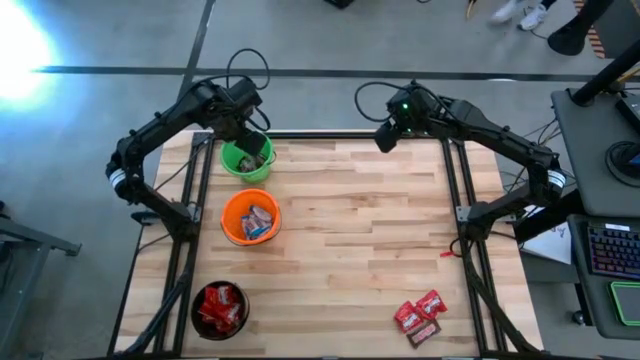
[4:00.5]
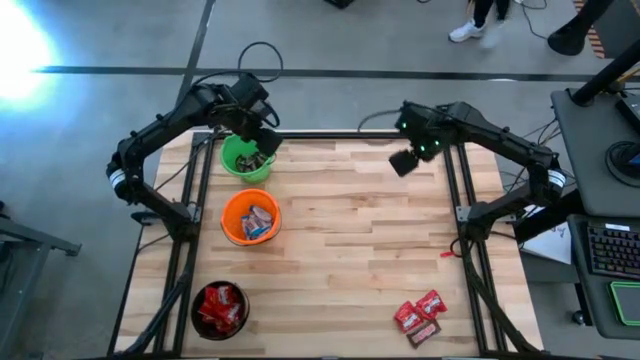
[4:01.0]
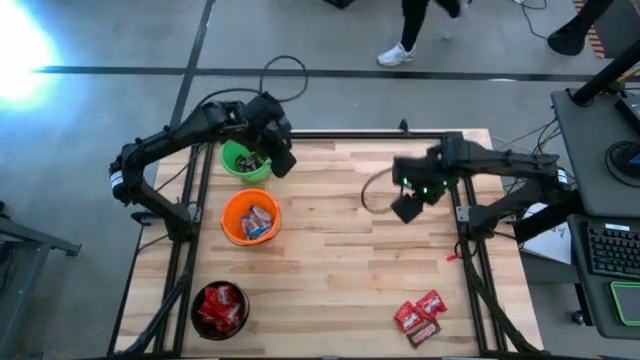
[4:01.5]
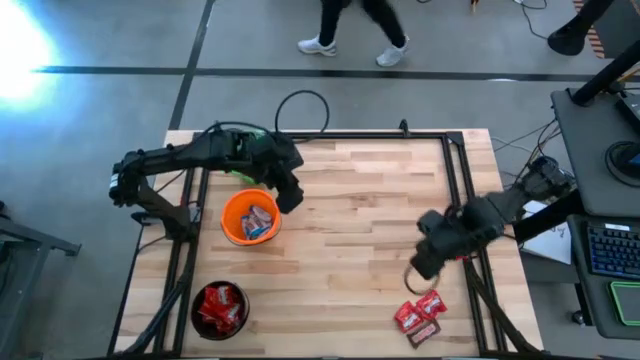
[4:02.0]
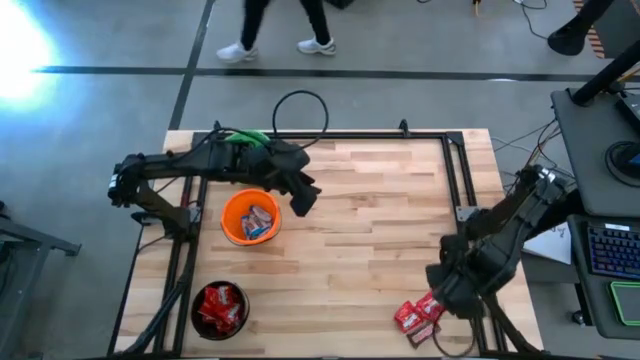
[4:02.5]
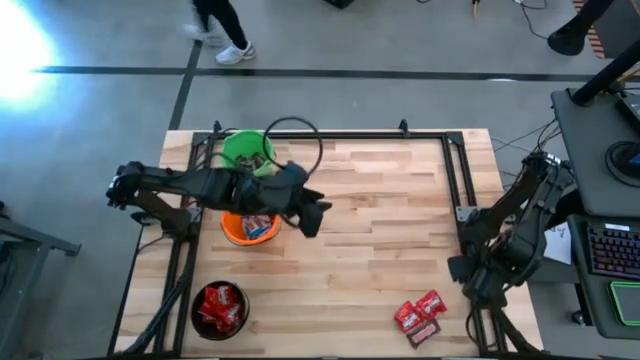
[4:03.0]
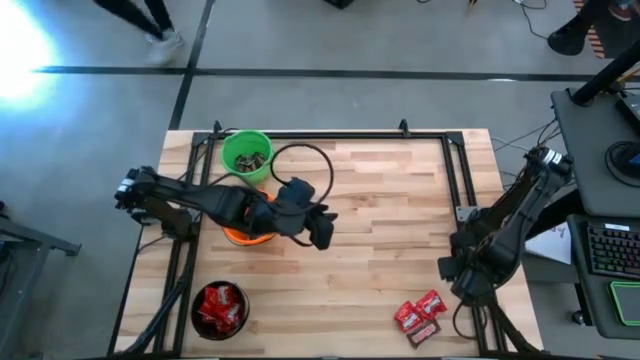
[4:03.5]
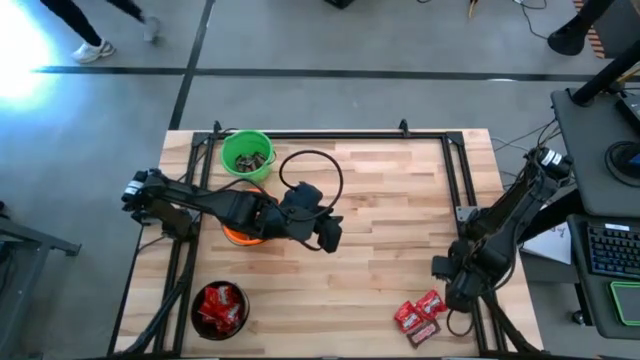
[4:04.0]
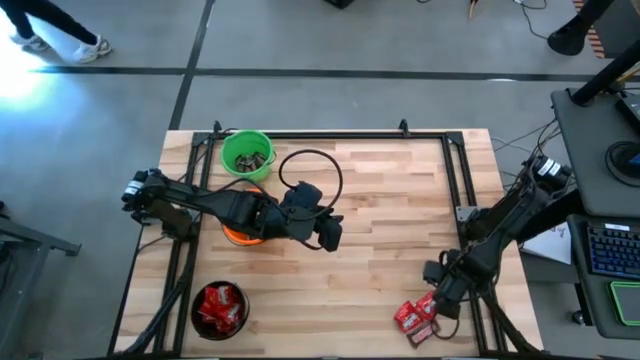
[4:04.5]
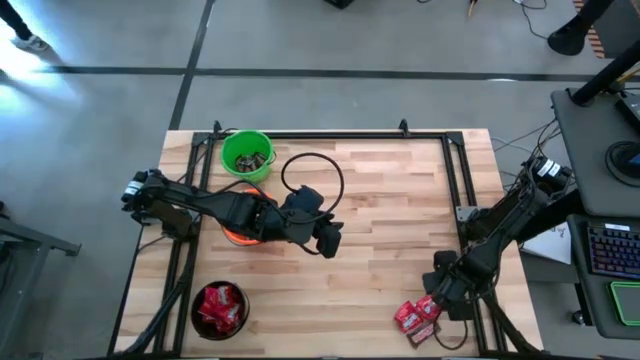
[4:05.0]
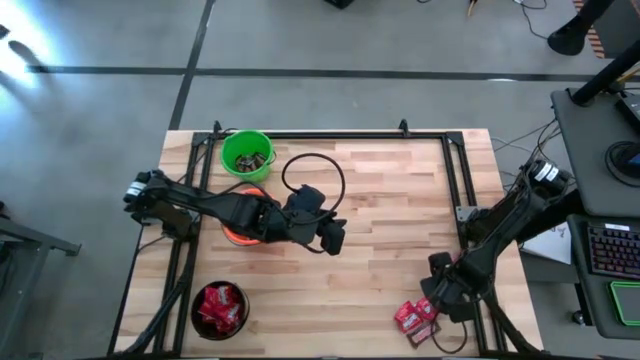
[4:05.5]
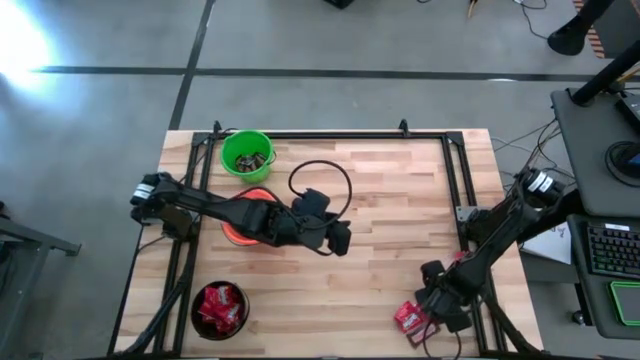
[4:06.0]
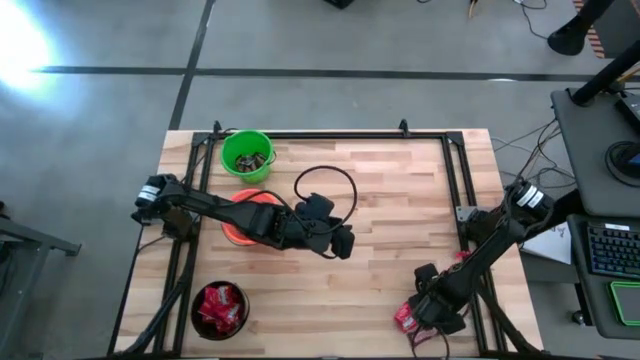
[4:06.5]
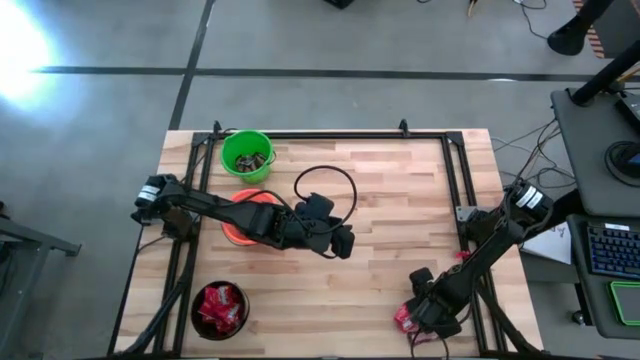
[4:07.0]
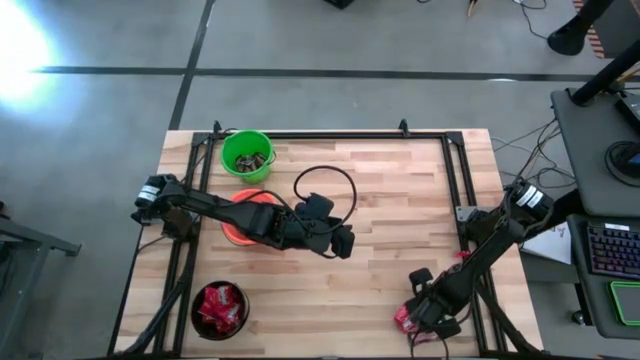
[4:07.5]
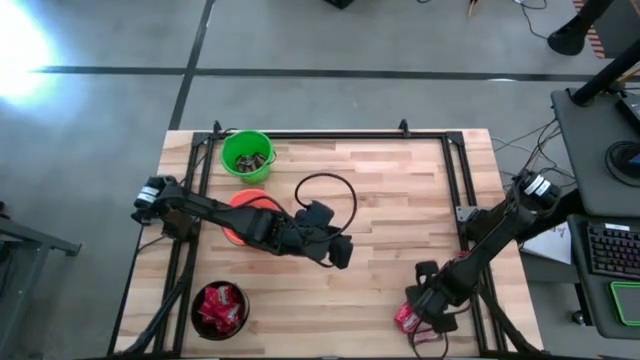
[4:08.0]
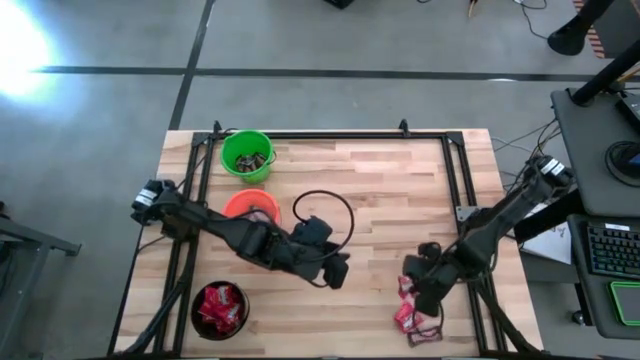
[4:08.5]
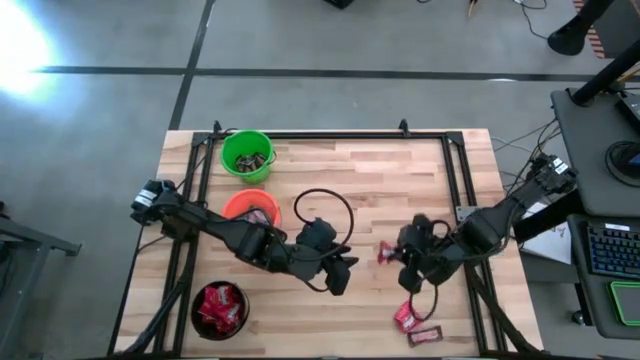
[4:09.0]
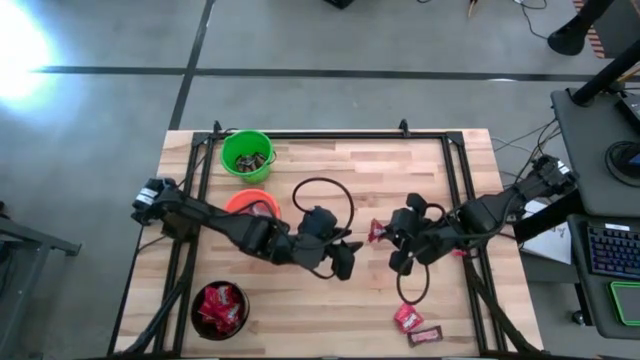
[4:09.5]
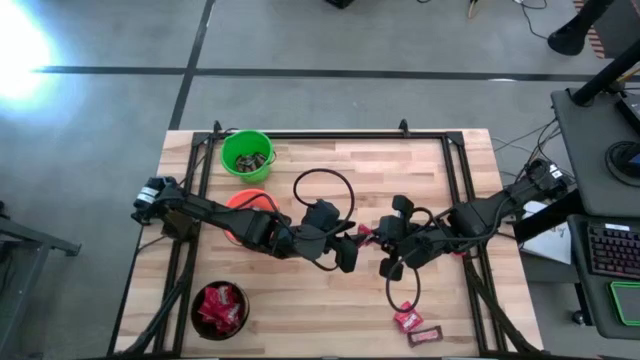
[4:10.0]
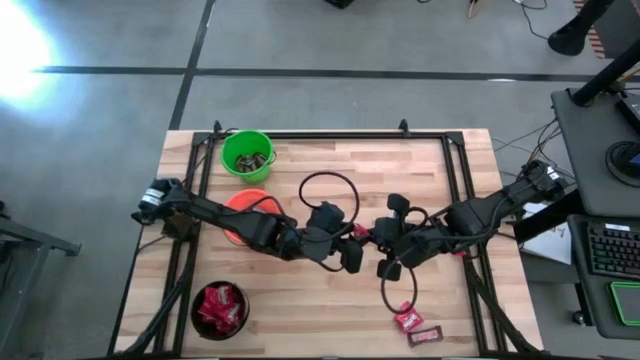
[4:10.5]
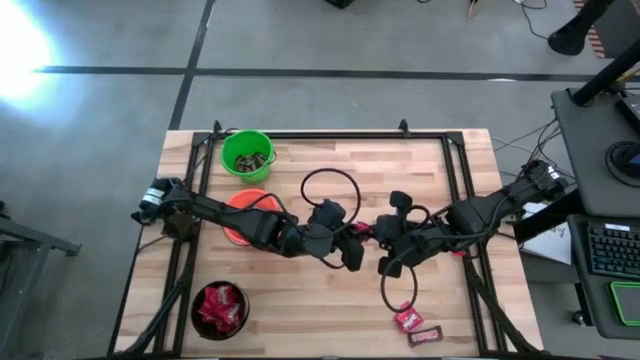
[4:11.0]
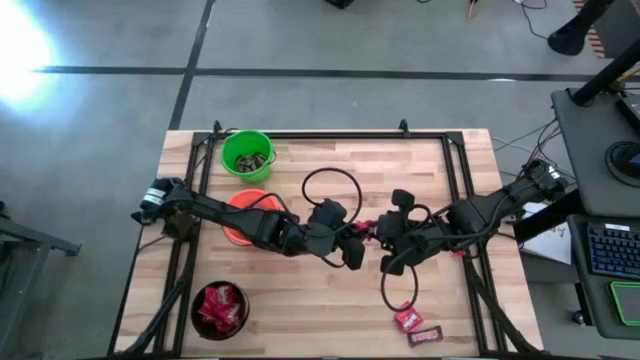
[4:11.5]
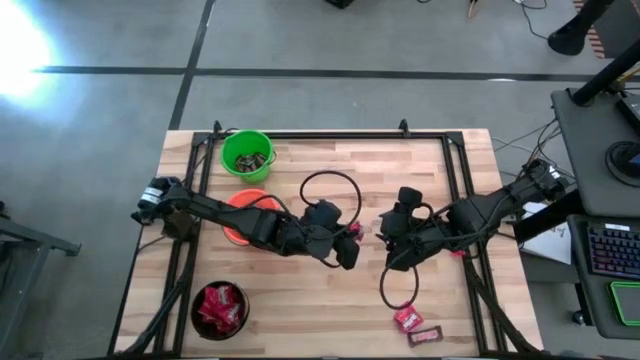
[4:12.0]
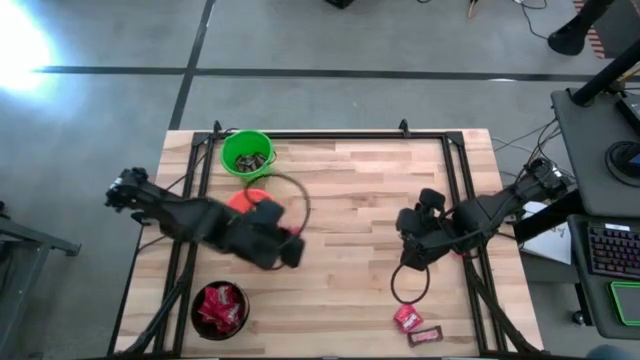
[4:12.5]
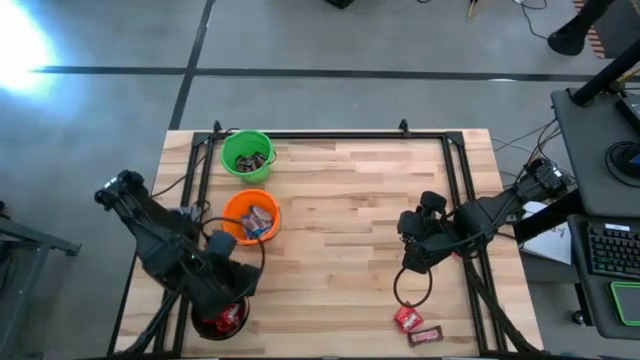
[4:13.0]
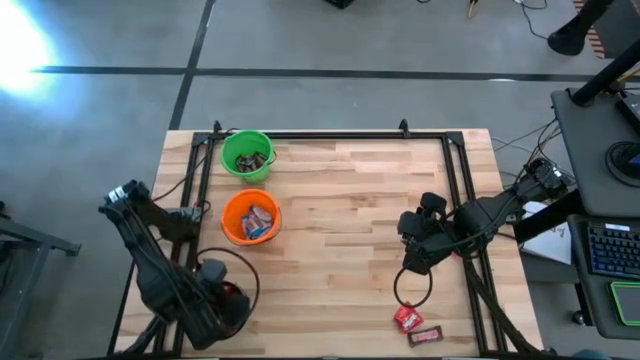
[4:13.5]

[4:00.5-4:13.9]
Task: Organize candy in baskets
Put the red candy into the black bucket

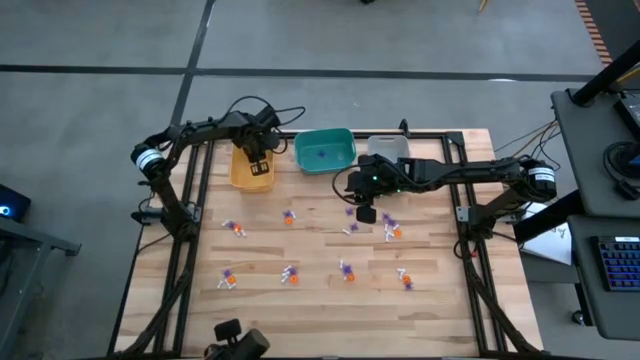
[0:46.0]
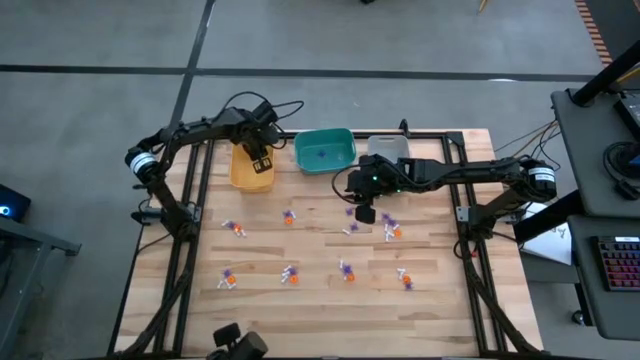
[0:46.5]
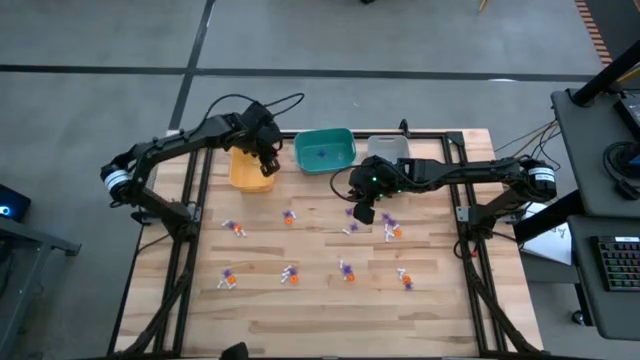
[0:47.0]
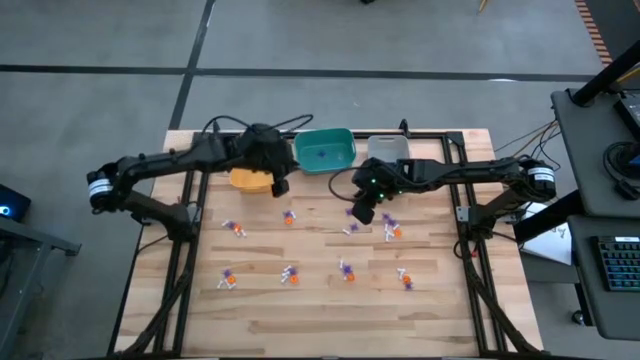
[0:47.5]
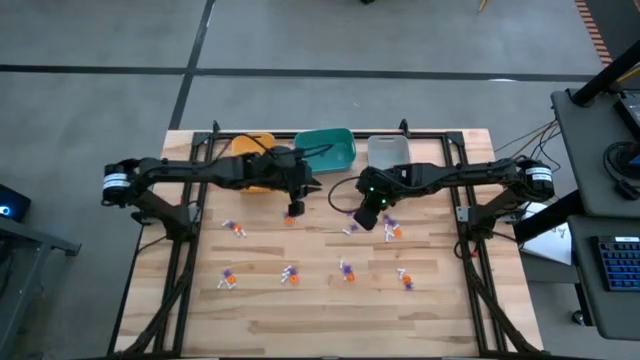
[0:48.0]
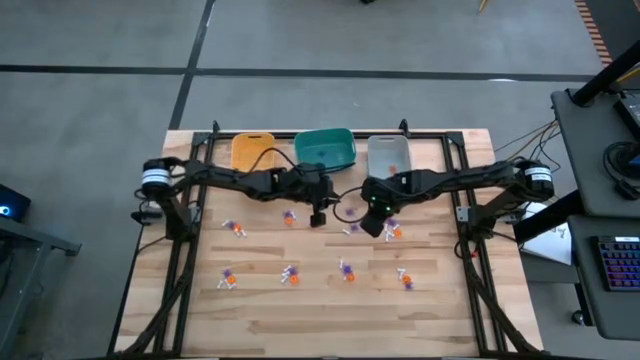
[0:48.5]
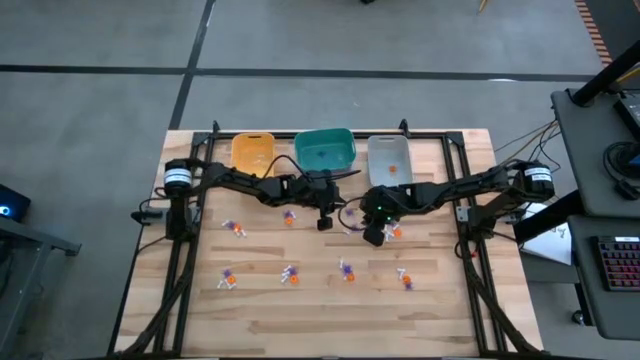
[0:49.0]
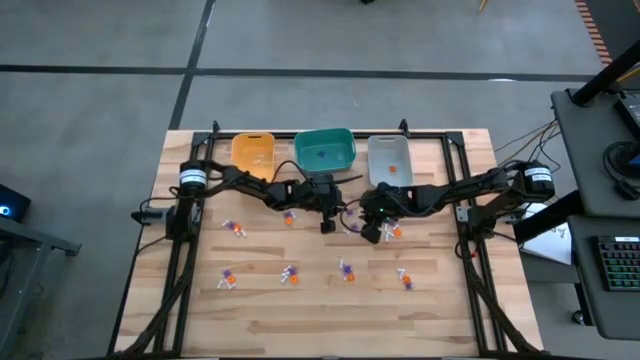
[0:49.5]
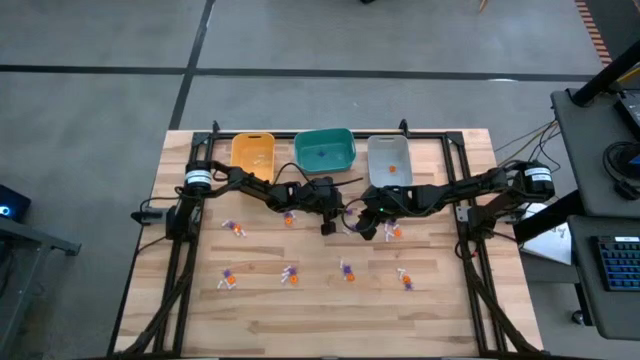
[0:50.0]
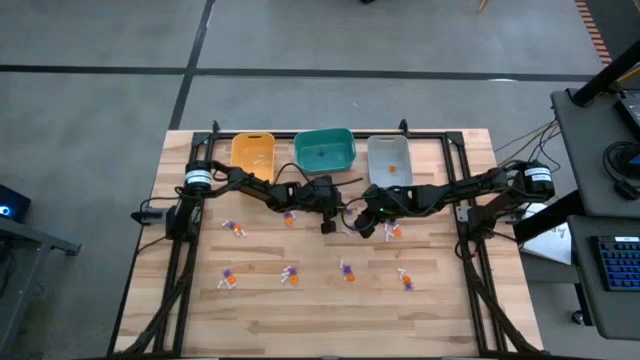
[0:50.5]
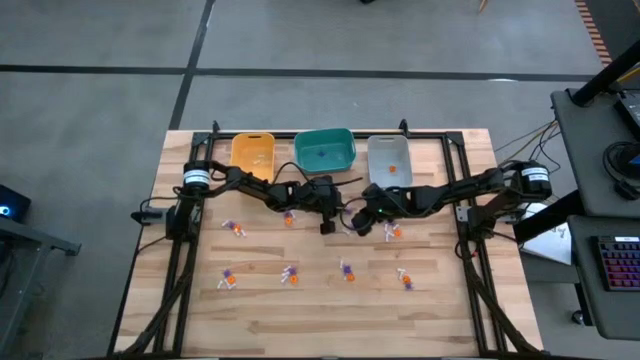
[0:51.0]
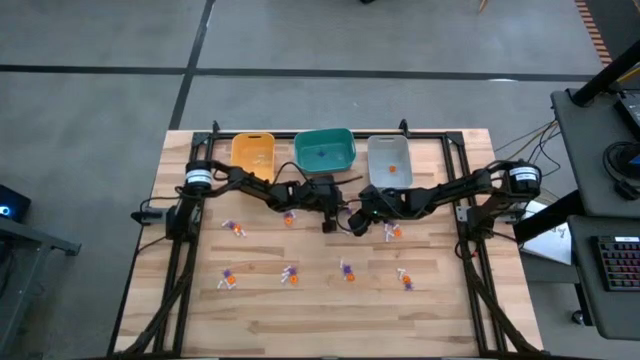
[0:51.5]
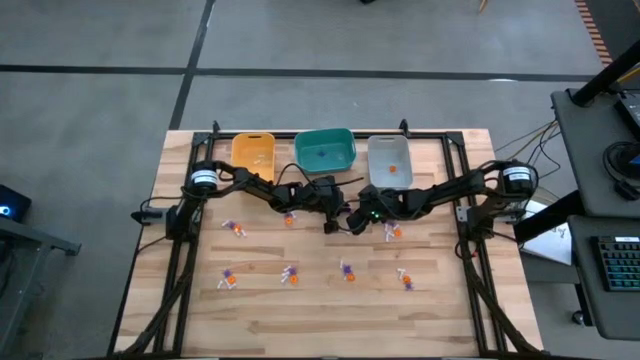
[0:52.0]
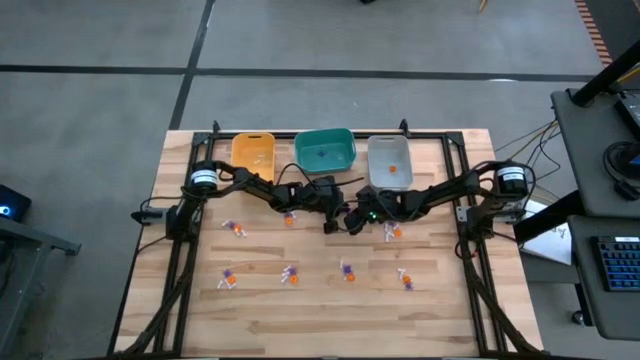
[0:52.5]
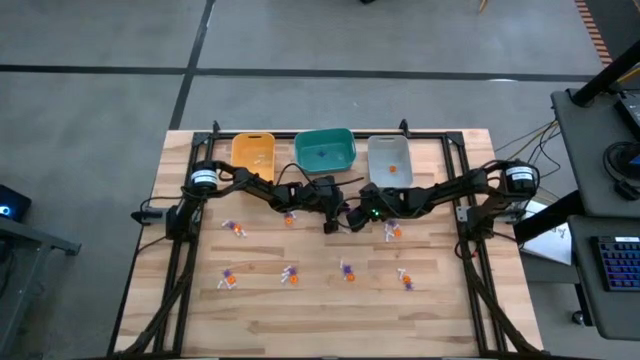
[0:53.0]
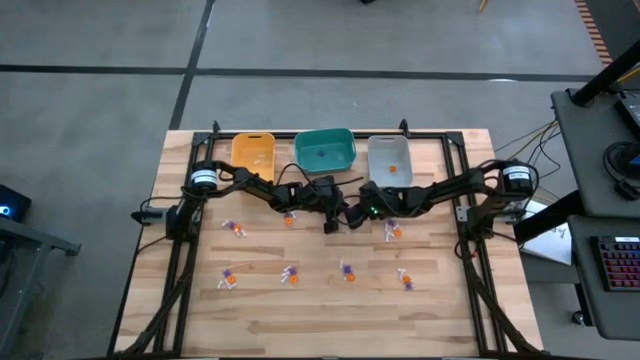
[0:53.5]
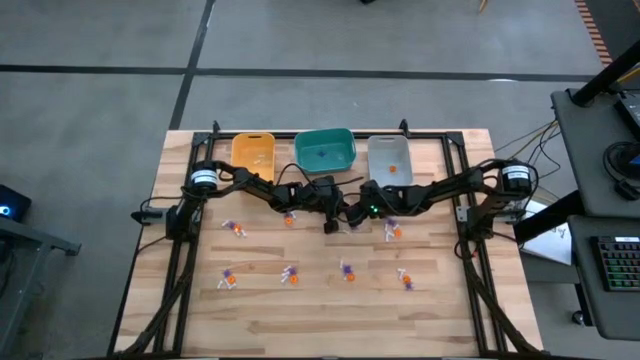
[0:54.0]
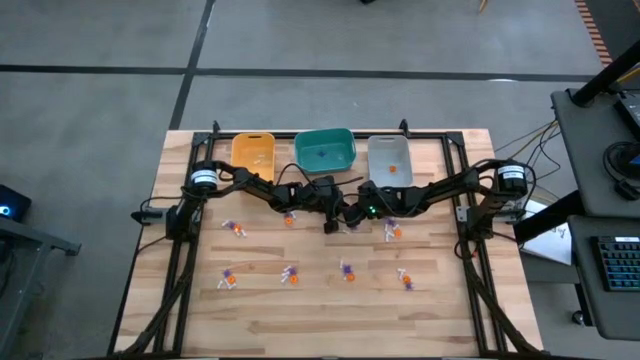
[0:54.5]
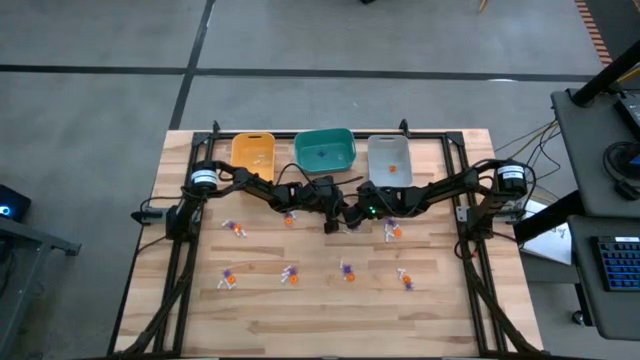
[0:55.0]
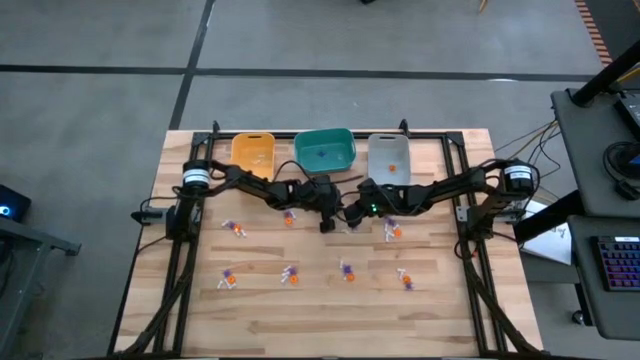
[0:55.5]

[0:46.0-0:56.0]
Task: Sort Halloween decoration
Put the small violet spider toy into the green bin
